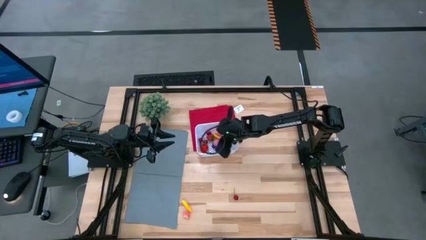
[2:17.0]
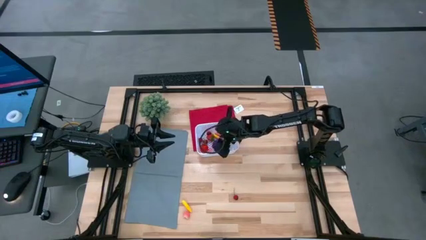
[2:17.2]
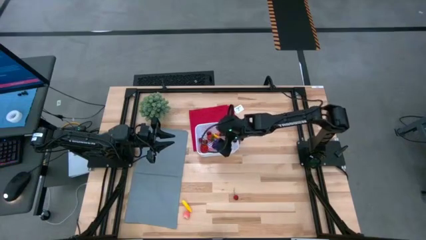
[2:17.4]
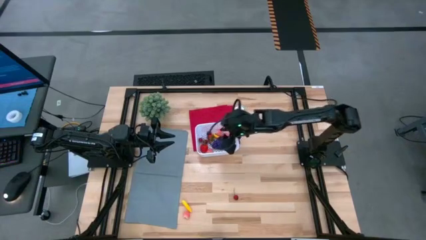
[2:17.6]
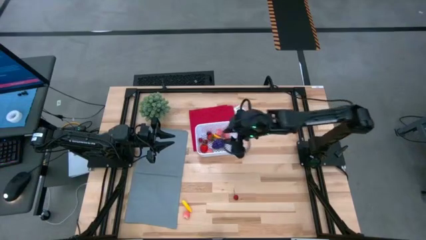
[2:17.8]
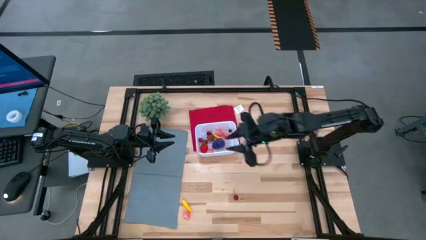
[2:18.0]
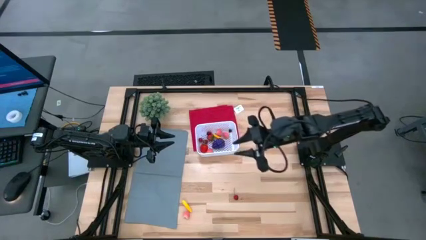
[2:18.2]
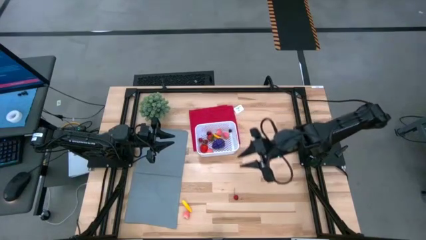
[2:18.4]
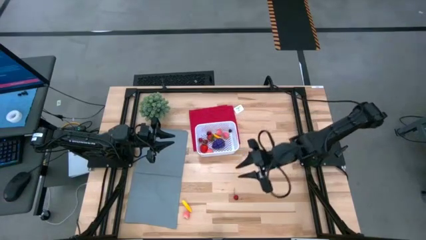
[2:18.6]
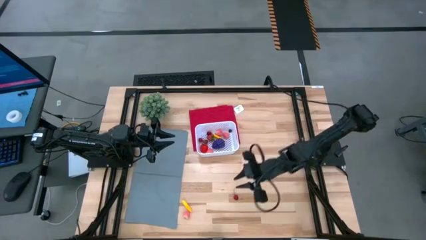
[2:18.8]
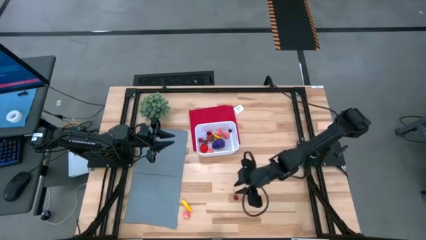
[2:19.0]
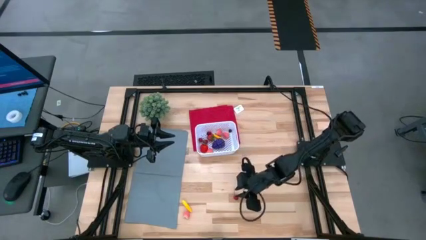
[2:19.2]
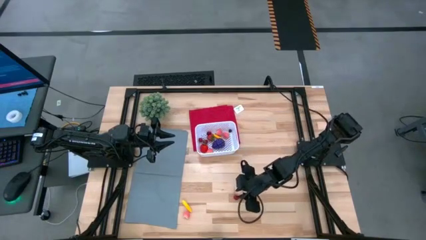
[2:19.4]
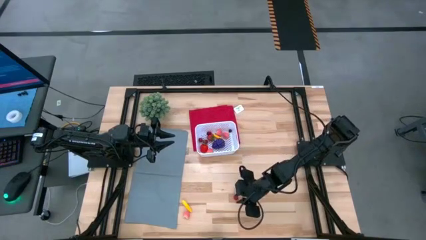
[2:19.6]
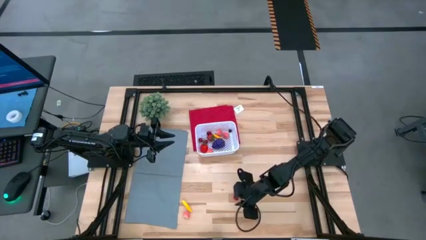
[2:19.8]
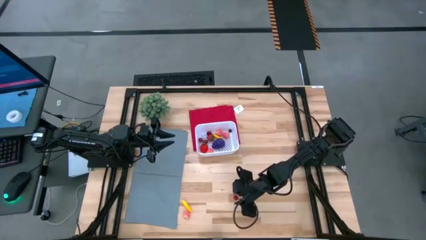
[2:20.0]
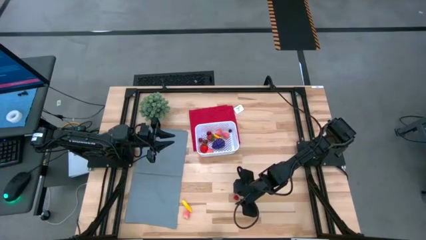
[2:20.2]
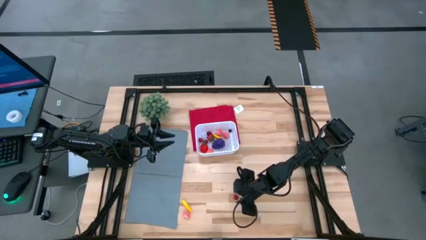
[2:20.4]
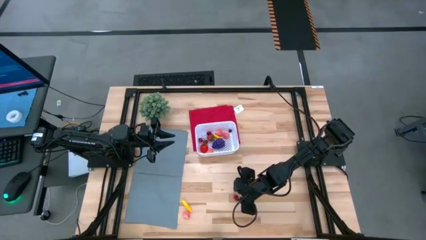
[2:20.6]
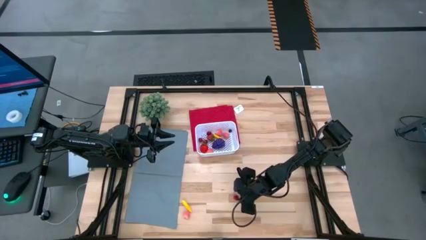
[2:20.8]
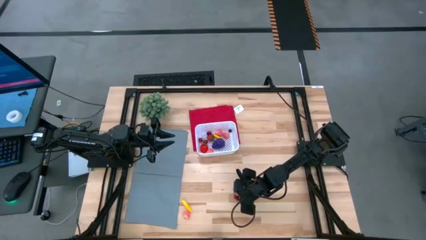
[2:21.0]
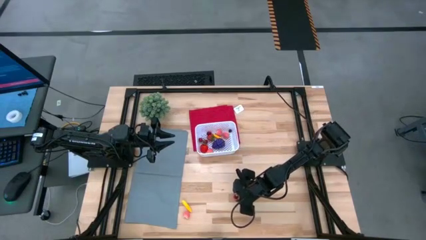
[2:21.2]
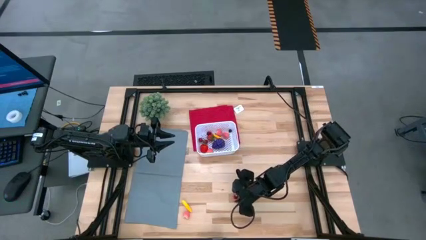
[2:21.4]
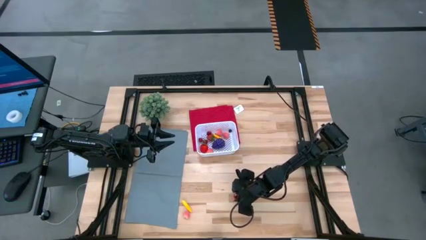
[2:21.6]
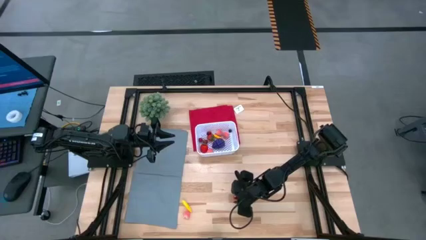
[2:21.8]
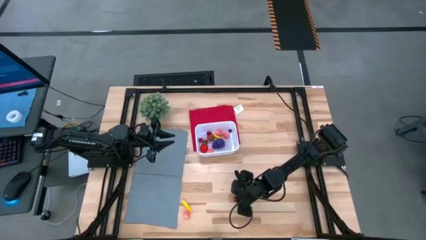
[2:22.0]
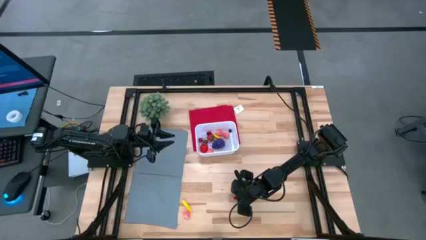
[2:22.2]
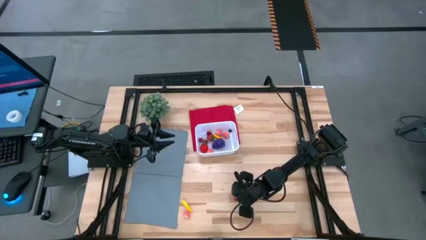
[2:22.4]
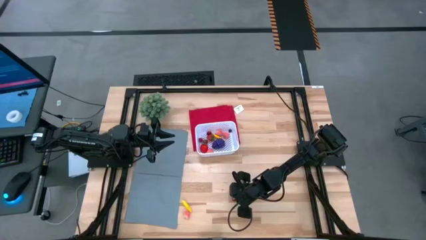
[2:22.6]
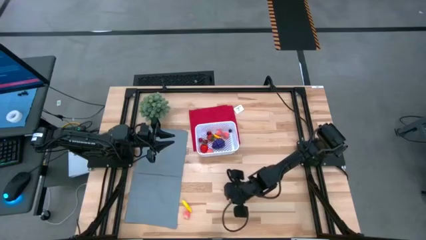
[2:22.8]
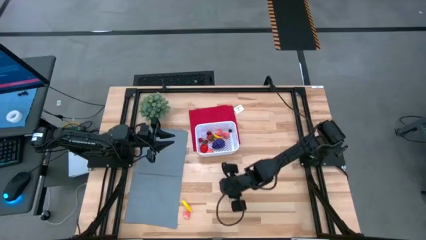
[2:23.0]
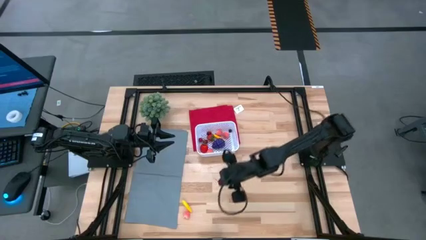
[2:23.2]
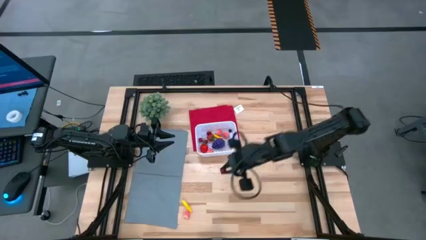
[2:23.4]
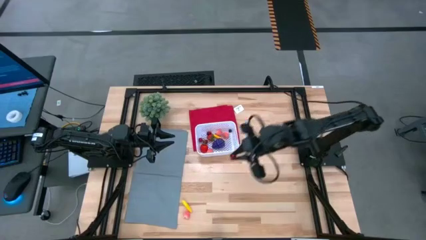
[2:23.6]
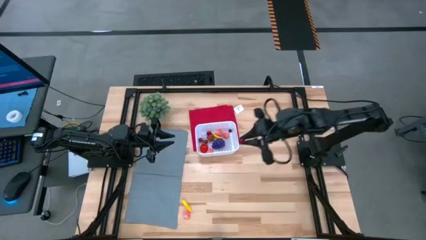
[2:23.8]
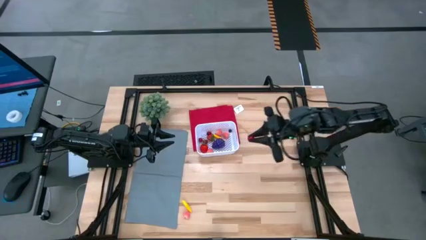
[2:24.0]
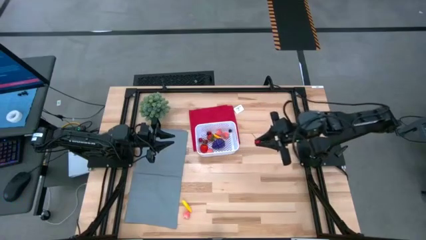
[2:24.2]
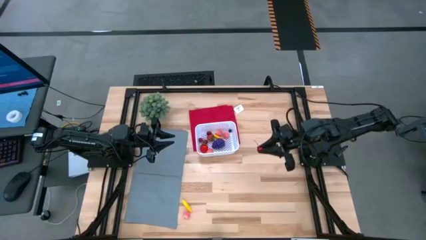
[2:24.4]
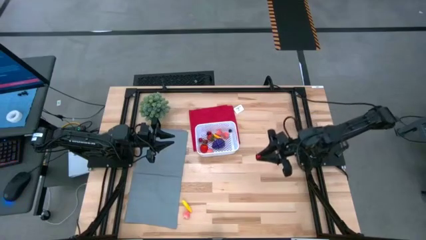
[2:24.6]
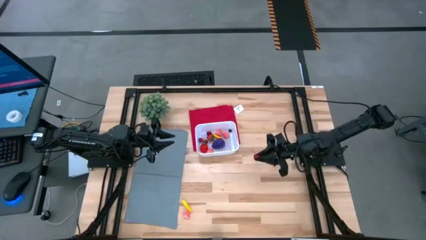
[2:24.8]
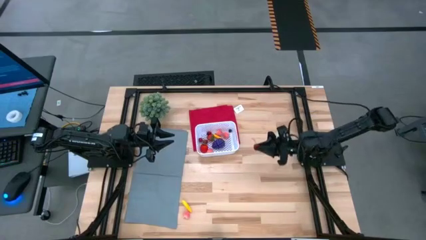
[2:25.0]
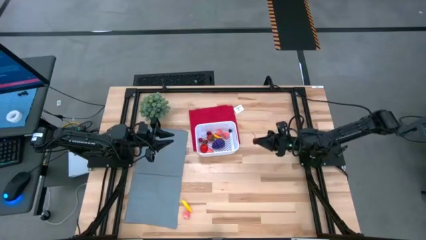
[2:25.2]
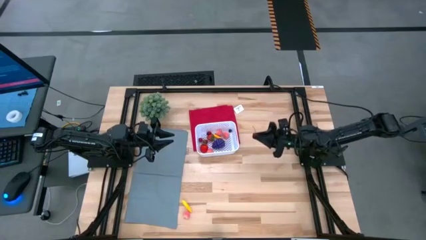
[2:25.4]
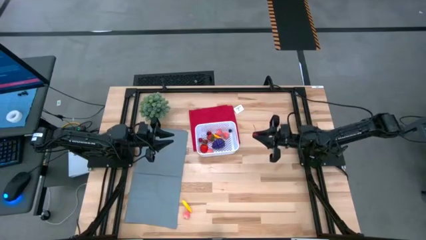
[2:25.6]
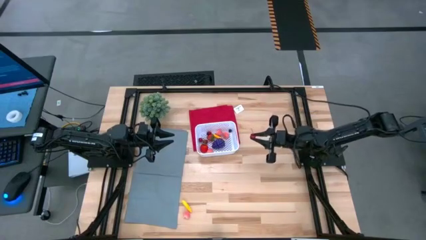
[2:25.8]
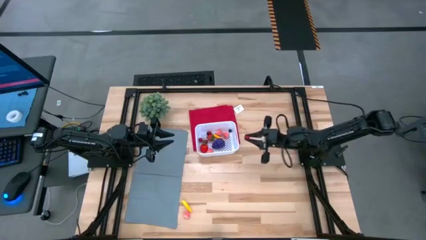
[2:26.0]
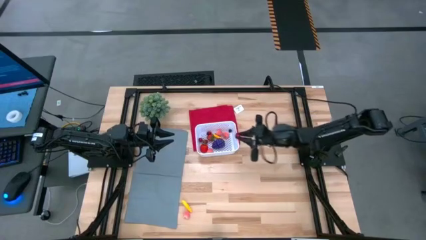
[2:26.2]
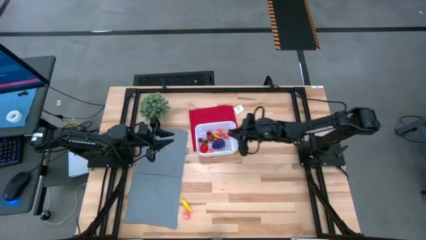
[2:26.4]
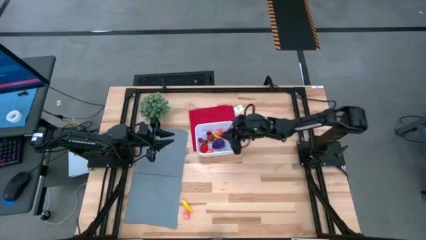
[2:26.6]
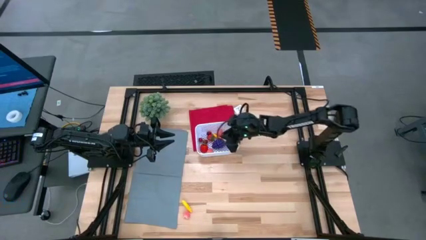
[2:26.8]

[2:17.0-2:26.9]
Task: Pick and placing Produce into tupperware
Put the red cherry into the white bin
